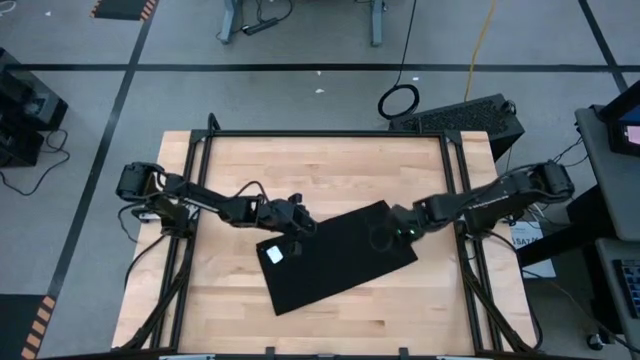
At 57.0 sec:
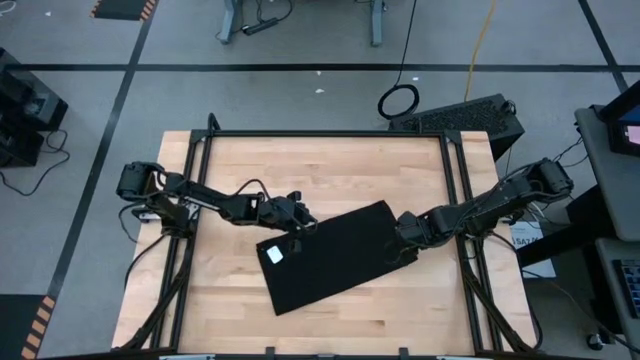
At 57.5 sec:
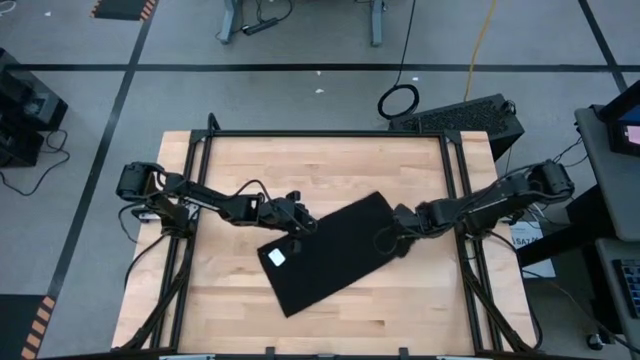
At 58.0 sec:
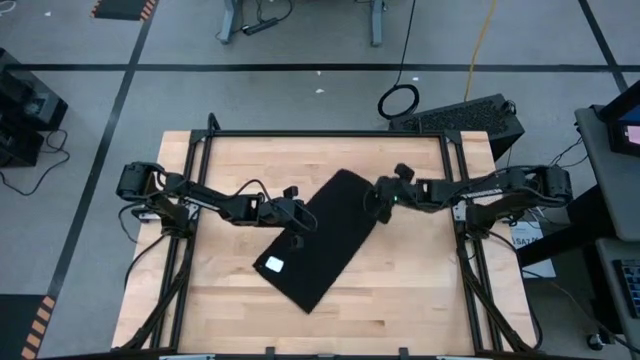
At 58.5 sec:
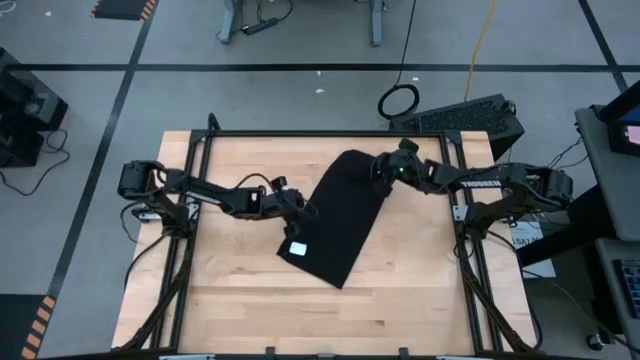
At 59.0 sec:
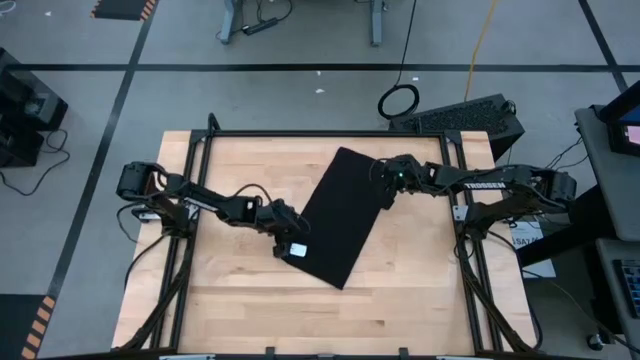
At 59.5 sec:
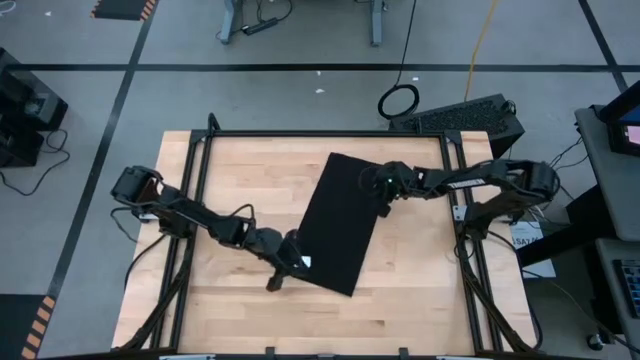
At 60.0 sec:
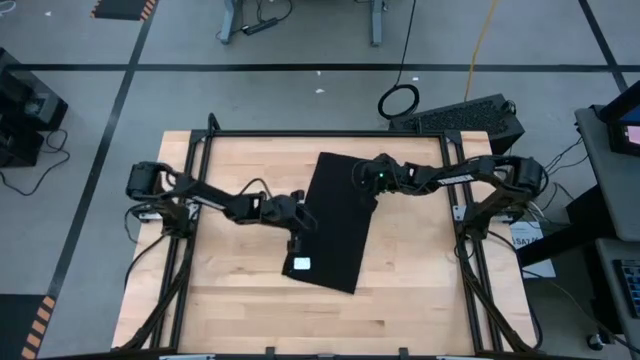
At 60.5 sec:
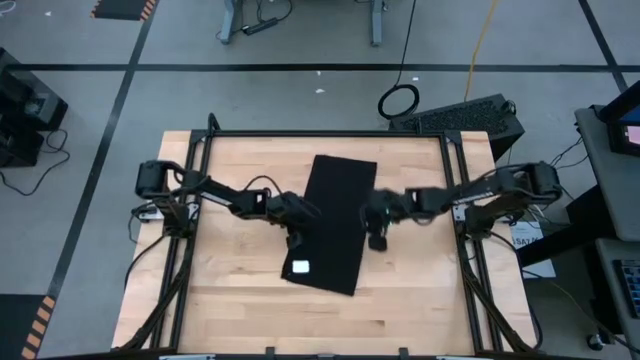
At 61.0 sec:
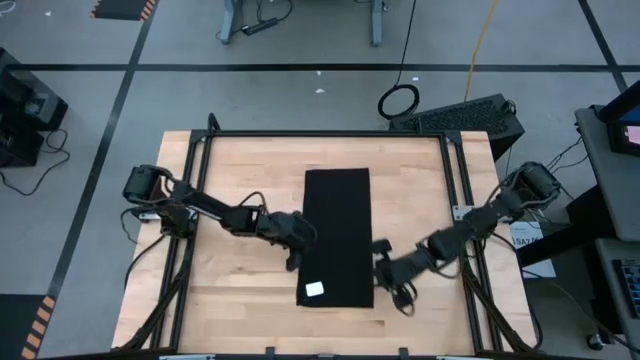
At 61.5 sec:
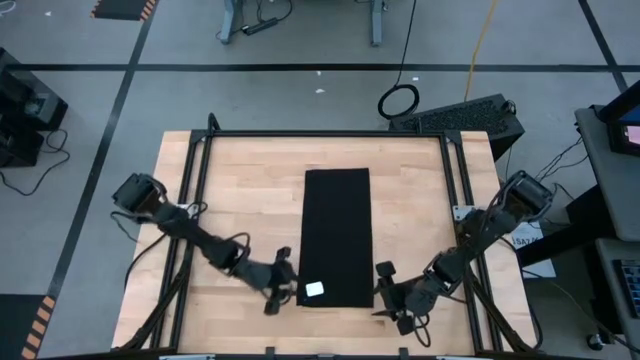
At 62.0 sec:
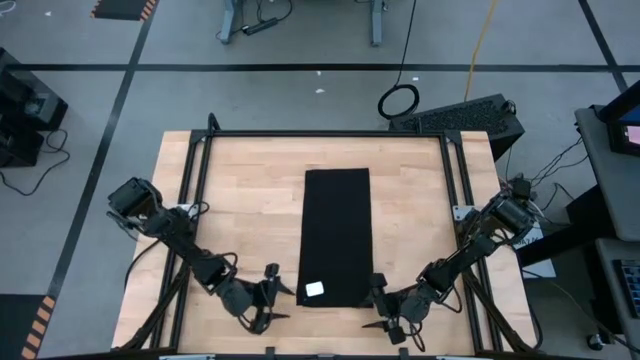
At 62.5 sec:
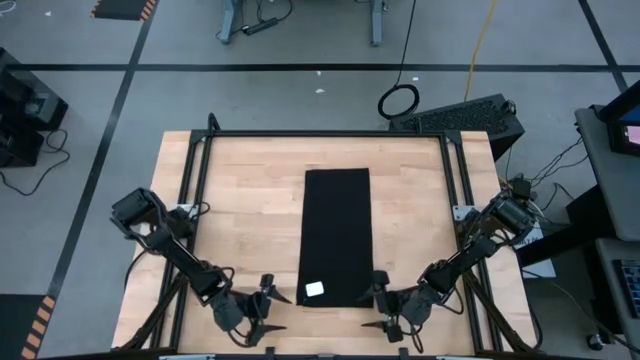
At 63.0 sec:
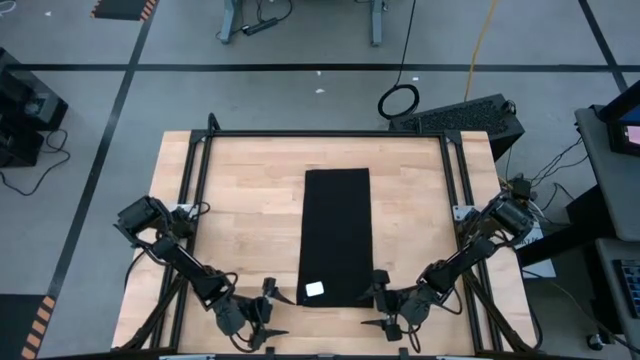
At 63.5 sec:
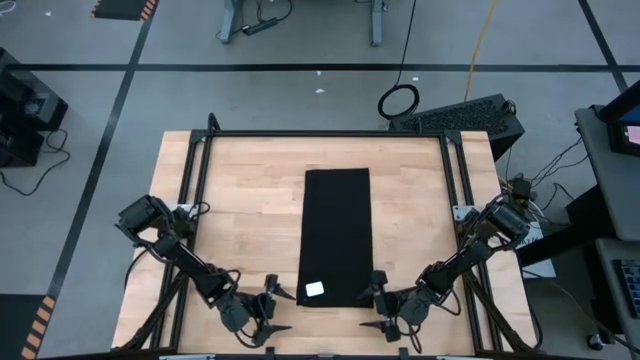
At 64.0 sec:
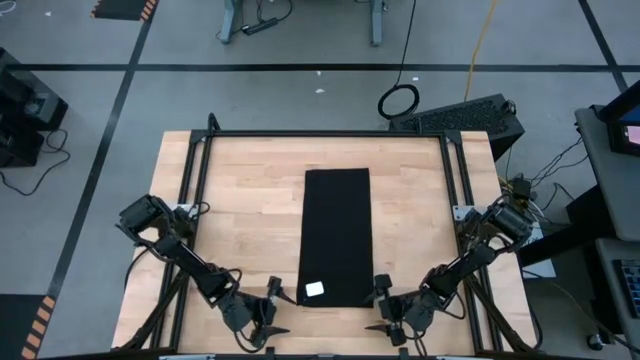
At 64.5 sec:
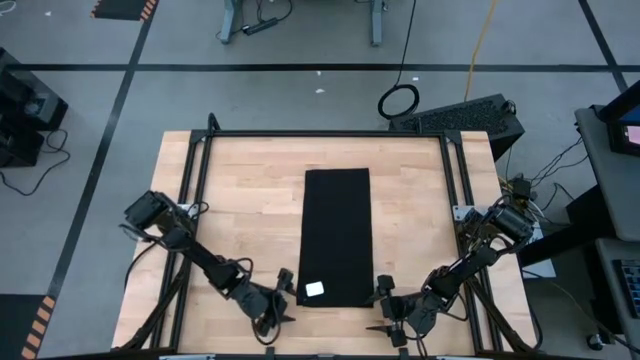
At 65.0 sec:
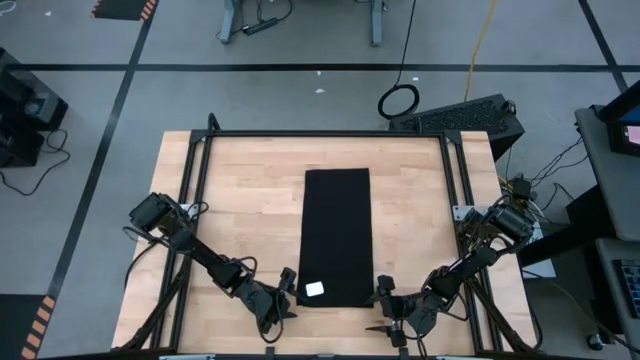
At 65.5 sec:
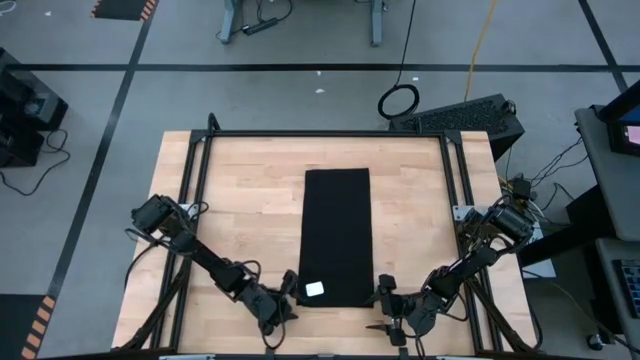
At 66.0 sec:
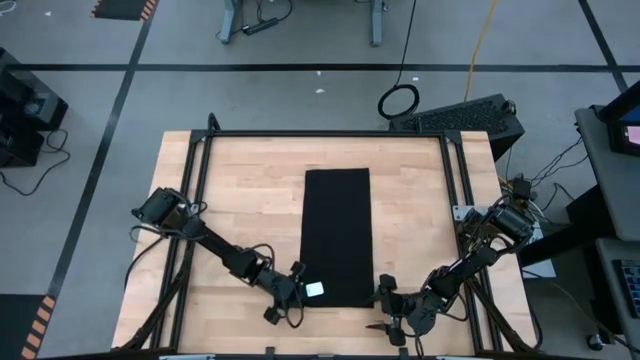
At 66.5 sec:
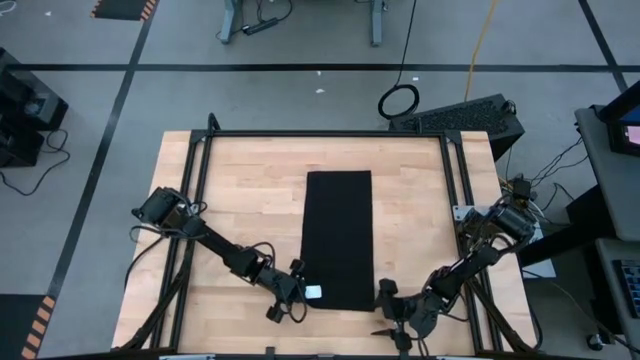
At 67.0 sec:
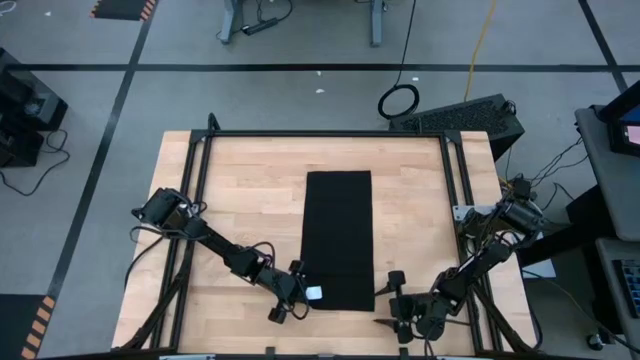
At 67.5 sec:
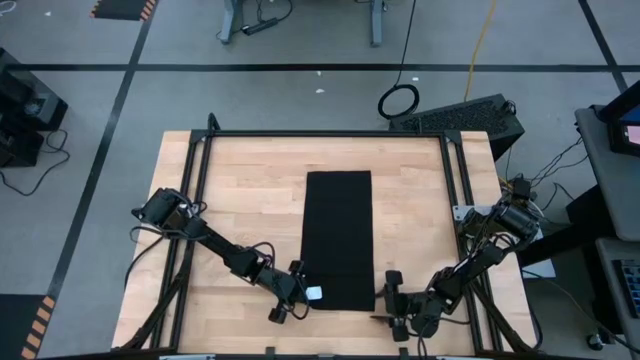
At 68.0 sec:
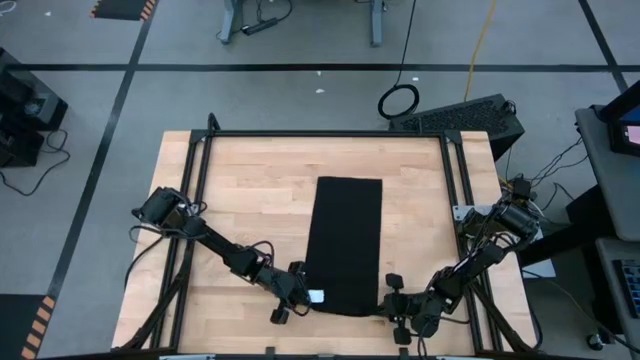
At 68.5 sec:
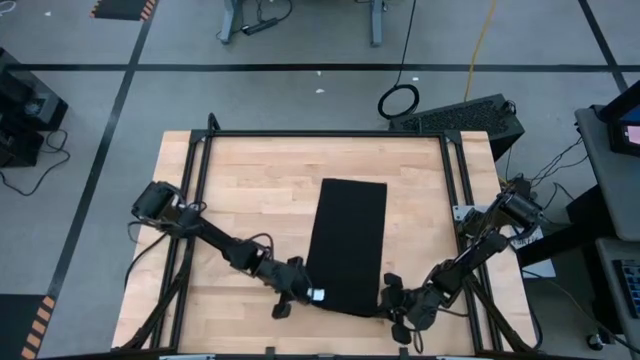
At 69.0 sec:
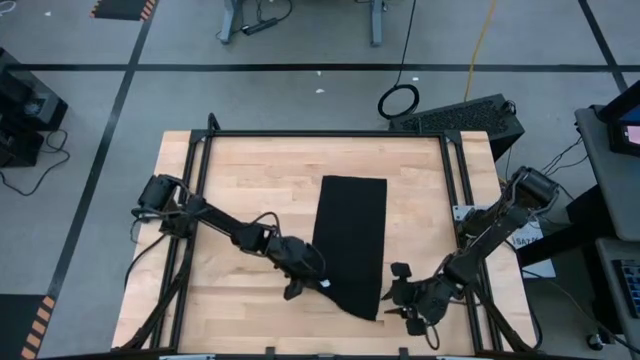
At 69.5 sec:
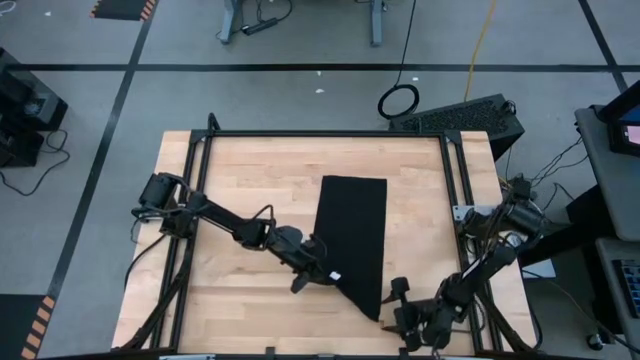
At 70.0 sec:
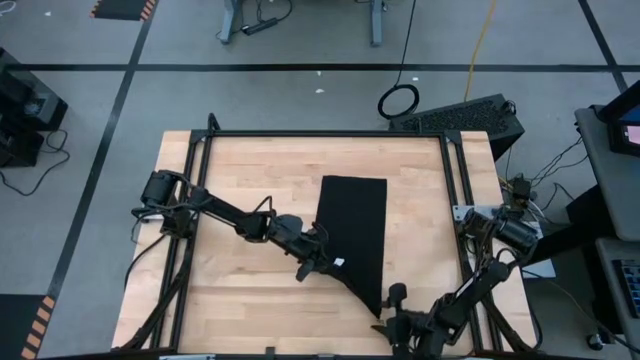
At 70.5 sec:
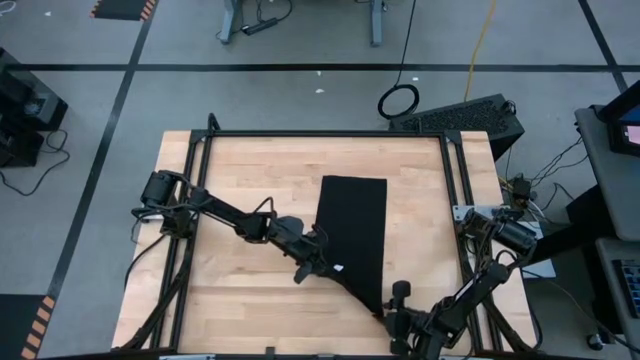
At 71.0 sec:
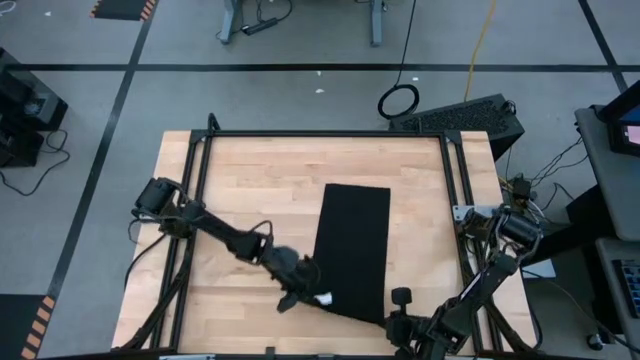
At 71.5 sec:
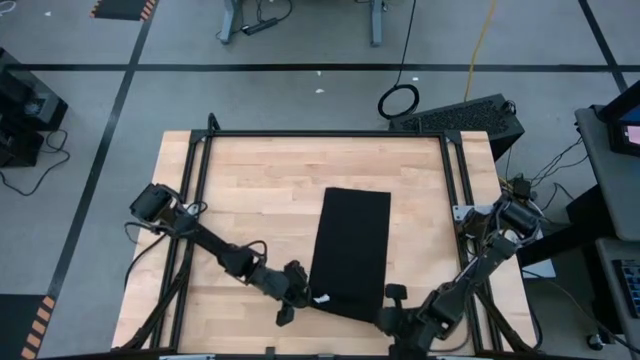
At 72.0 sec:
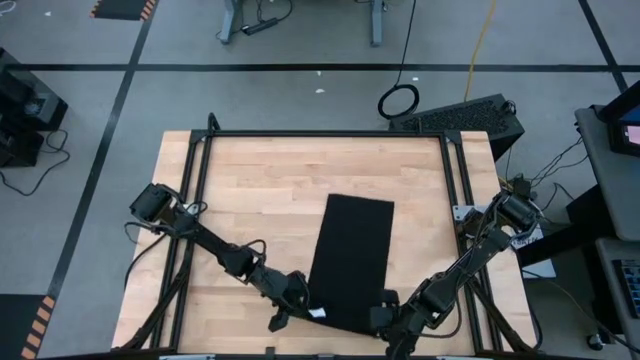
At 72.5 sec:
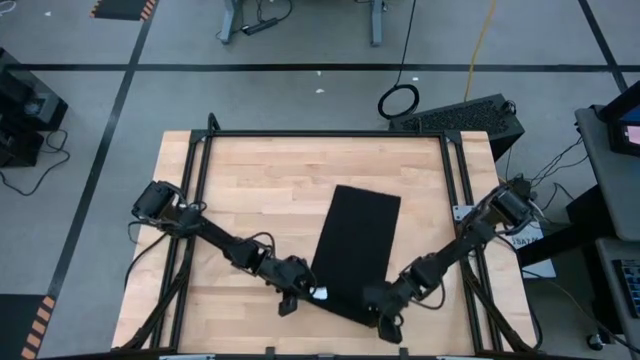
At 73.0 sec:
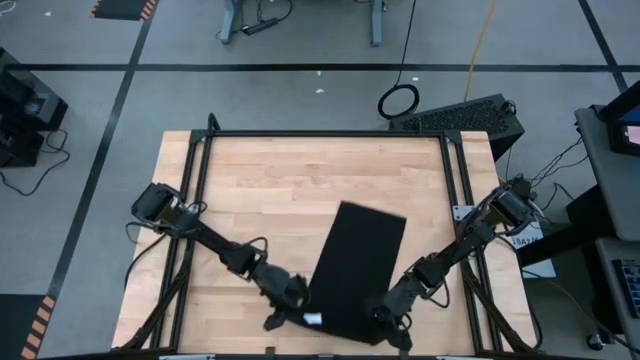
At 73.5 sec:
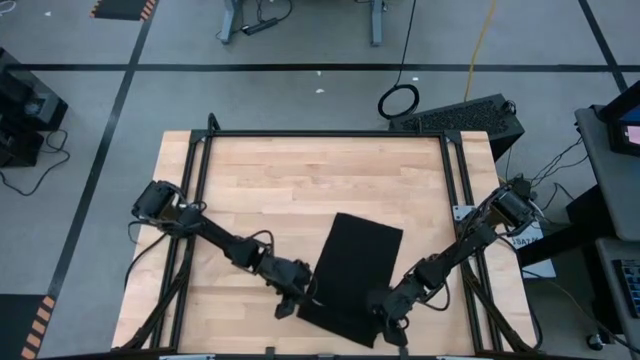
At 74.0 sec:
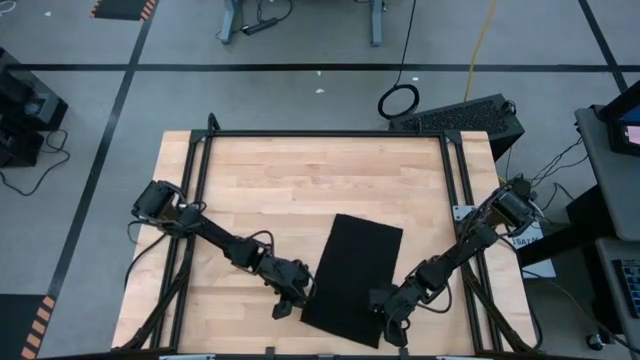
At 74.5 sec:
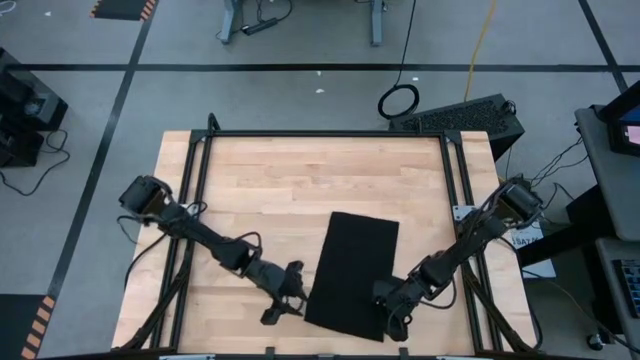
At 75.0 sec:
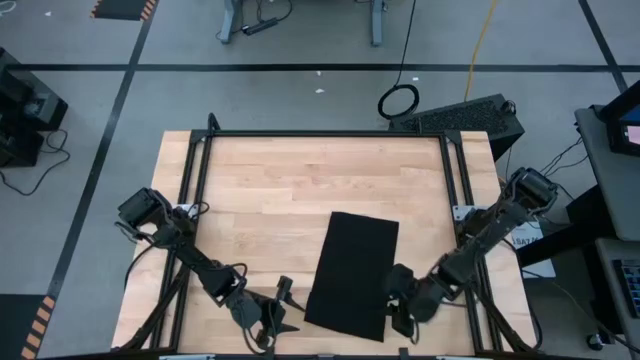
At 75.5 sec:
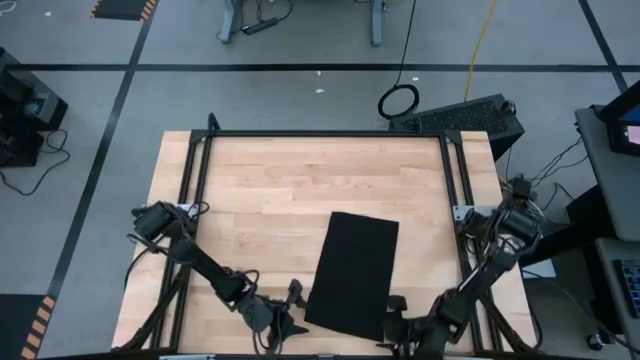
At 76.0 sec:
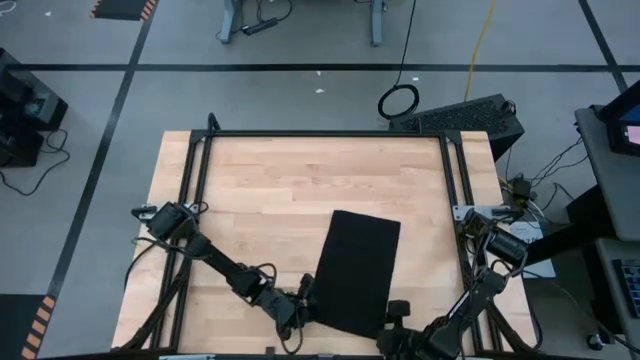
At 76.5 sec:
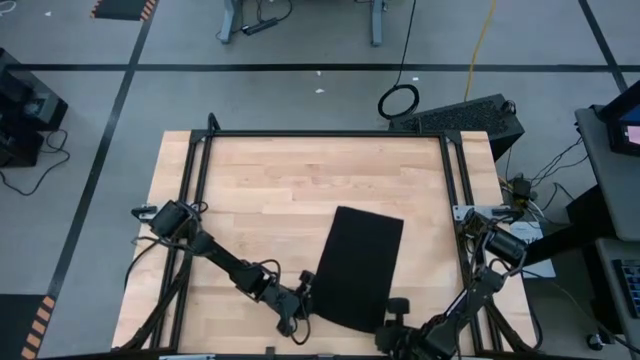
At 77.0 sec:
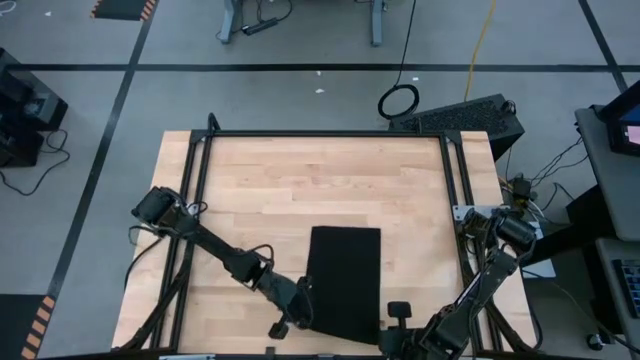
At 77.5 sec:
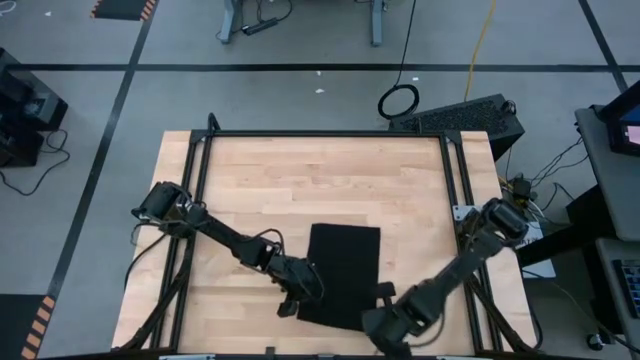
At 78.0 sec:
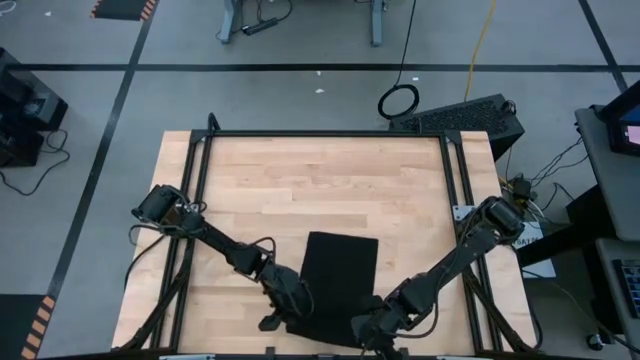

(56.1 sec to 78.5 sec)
Task: Roll towel
Roll the black microfiber towel
